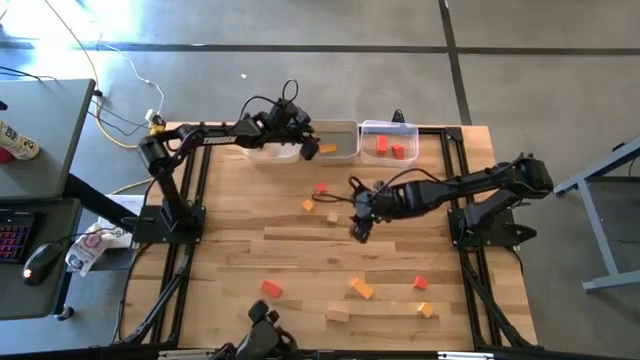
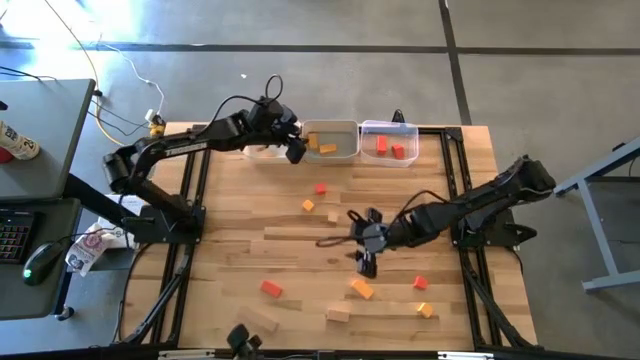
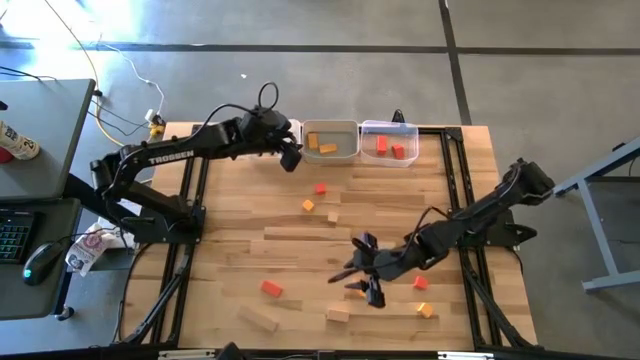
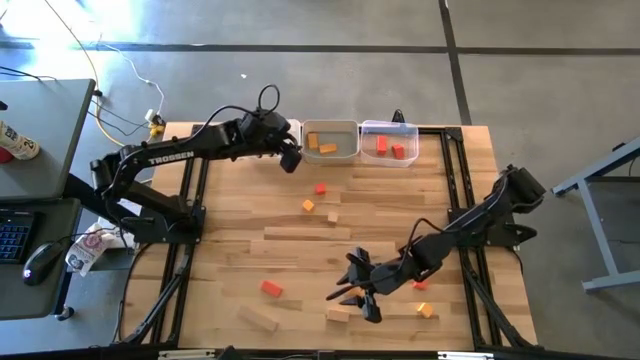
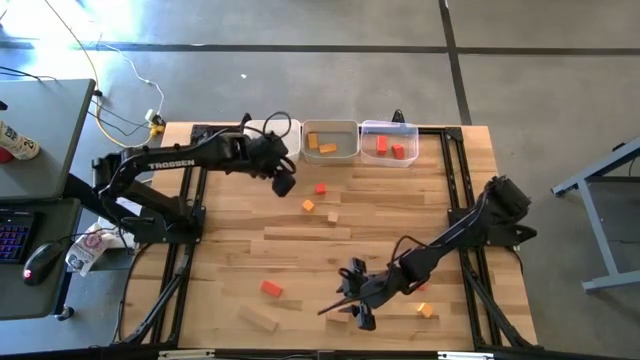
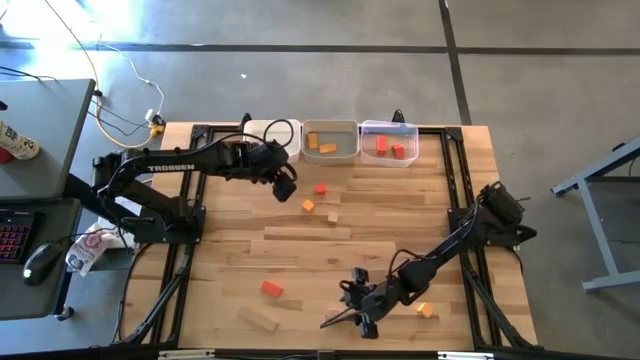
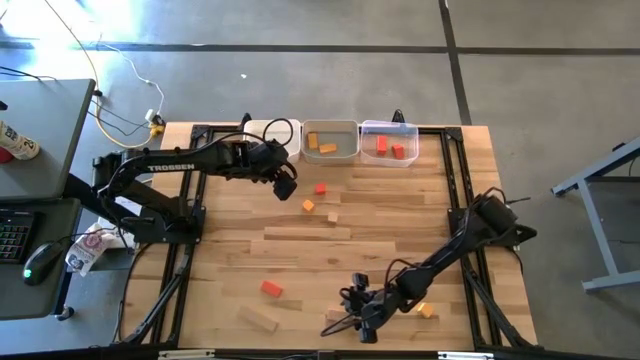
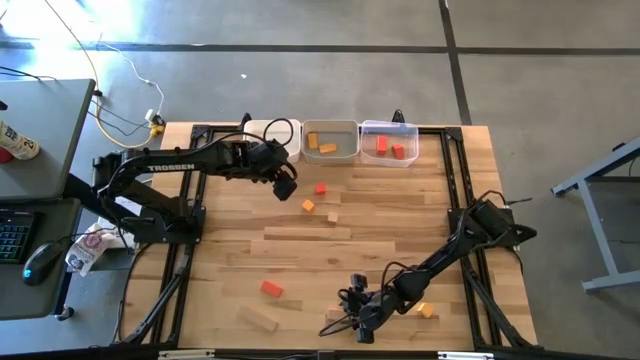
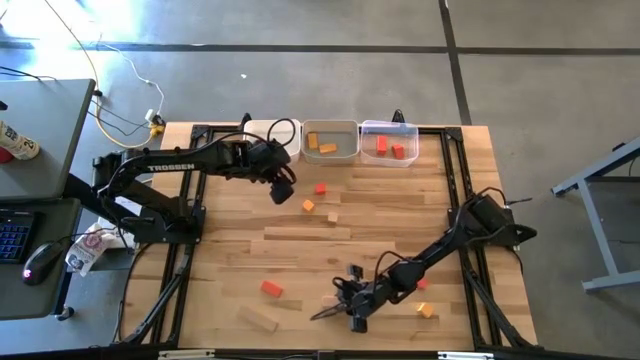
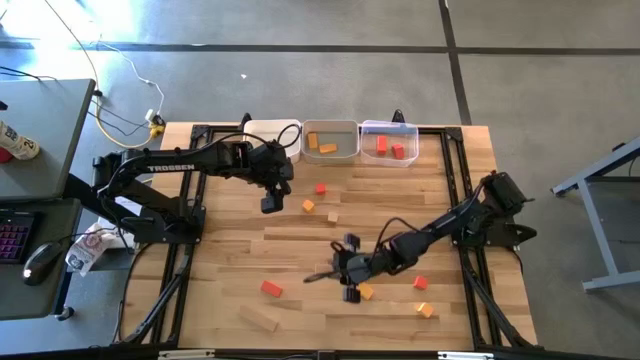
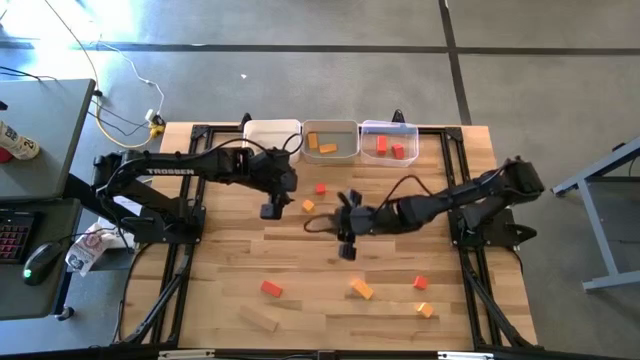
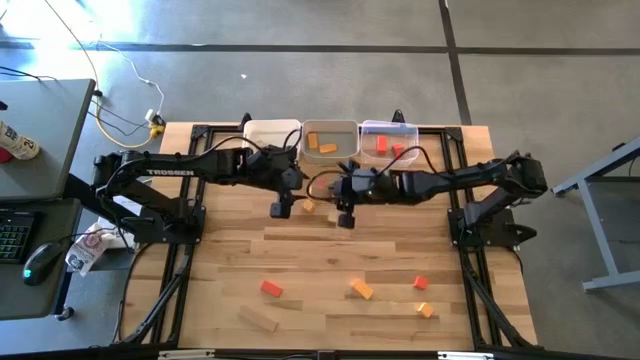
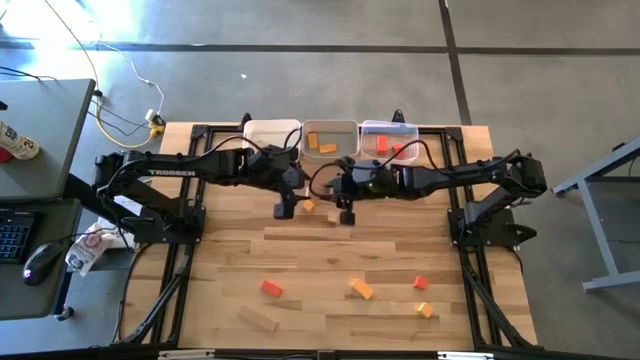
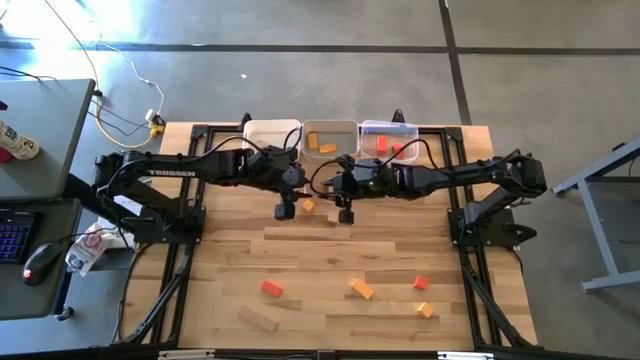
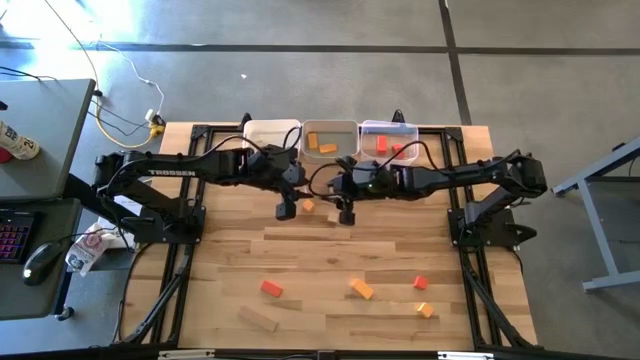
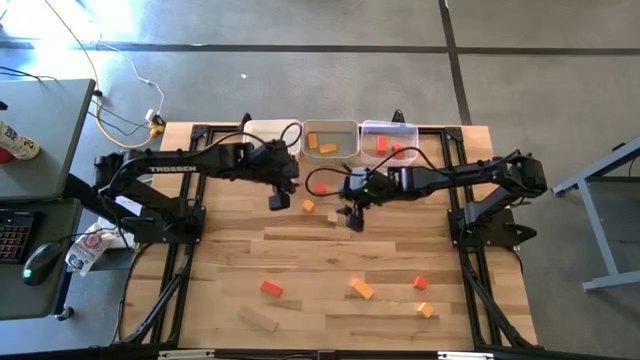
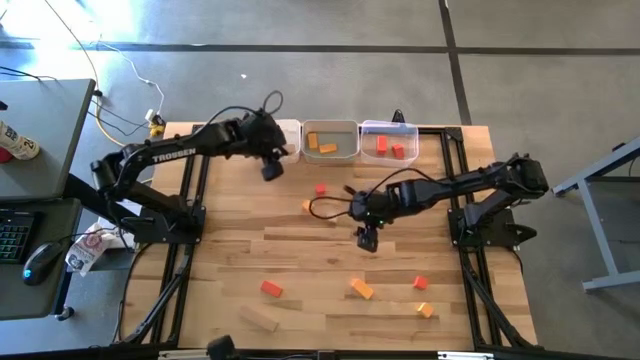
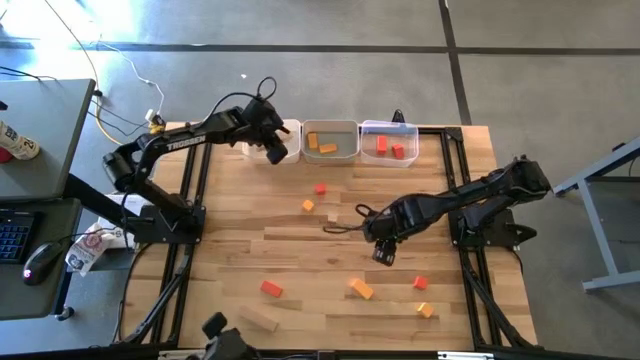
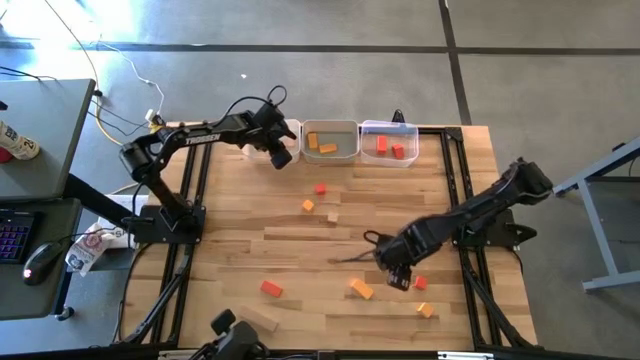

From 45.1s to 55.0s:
Task: Sort & place blocks by color
Put the brown block into the white bin

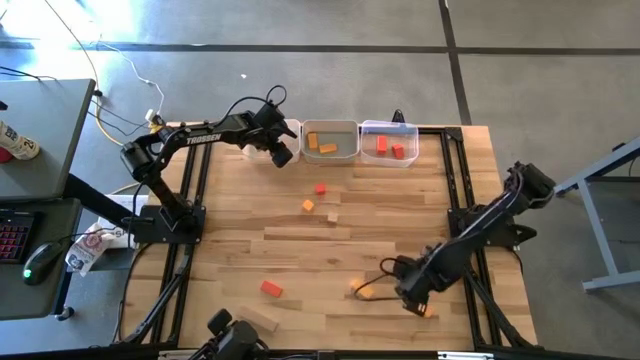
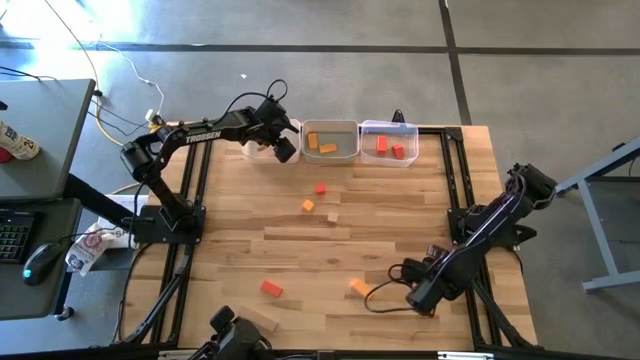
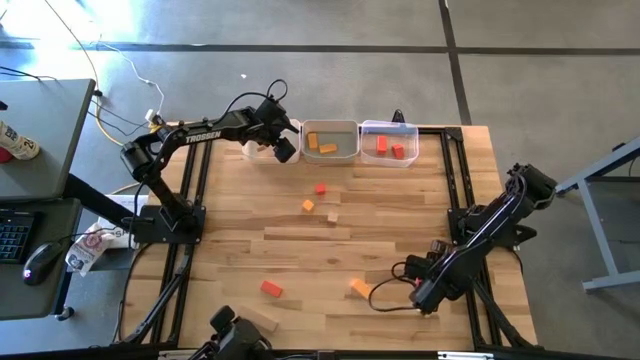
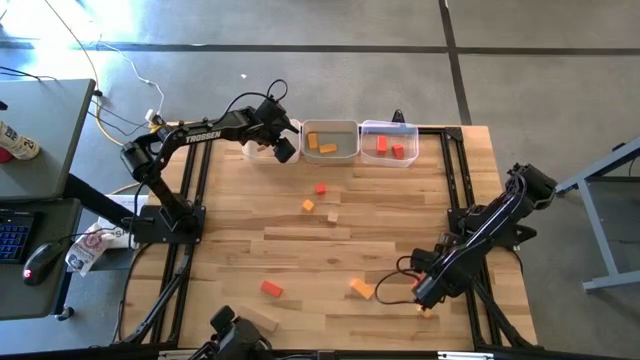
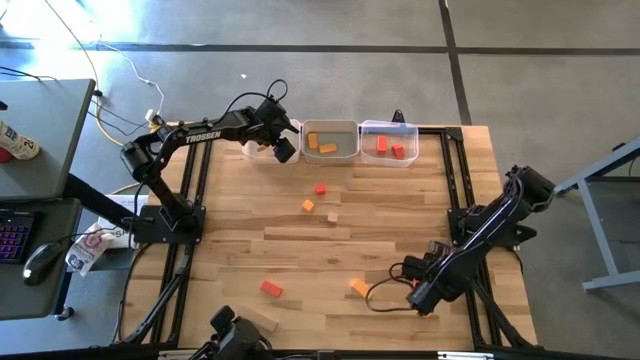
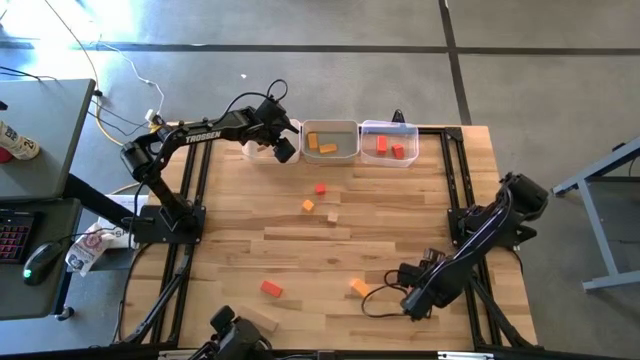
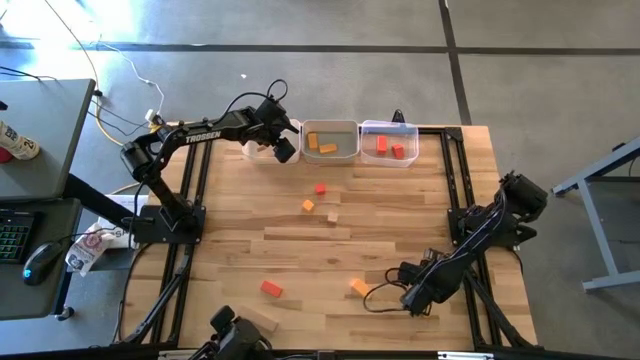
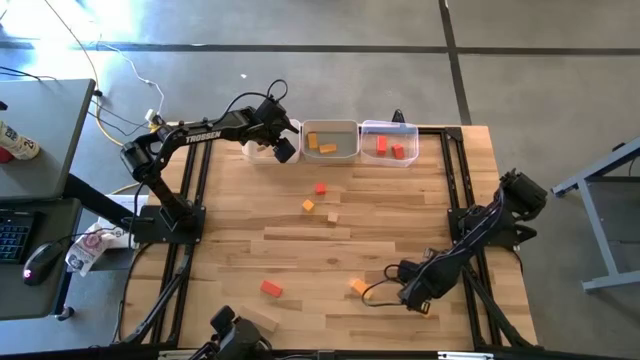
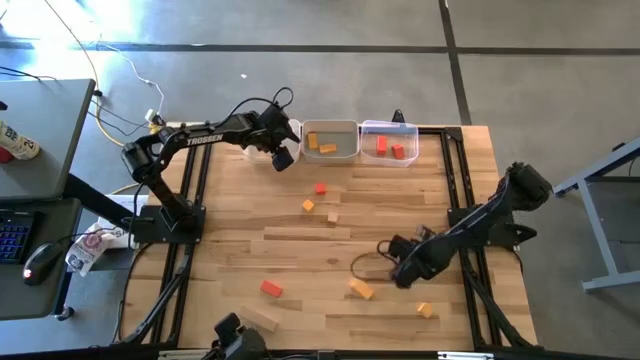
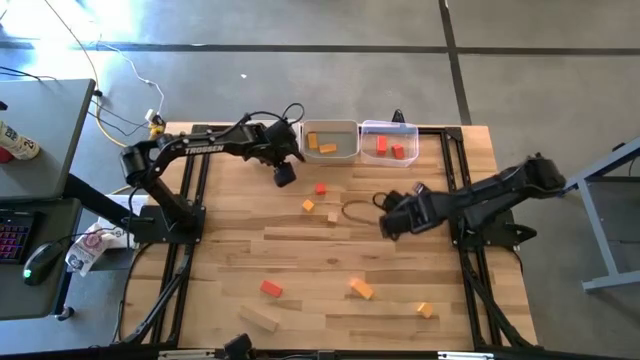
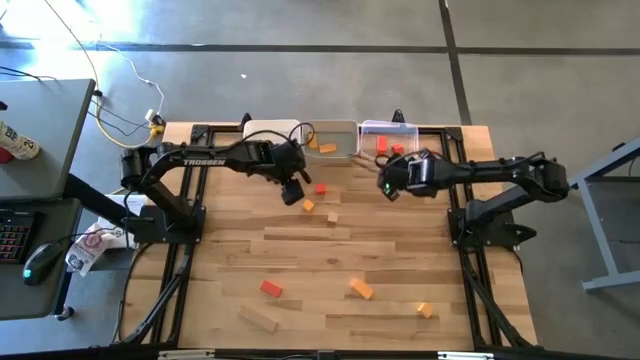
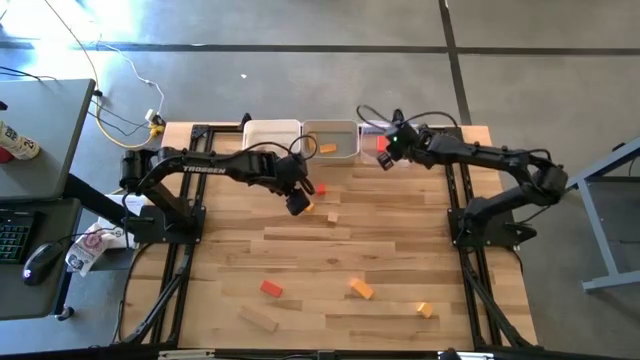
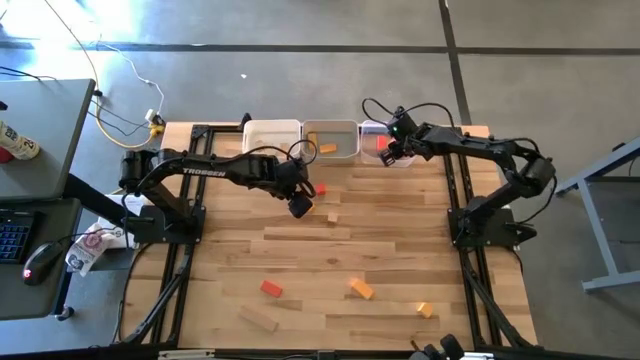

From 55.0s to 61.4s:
Put the orange block into the transparent bin

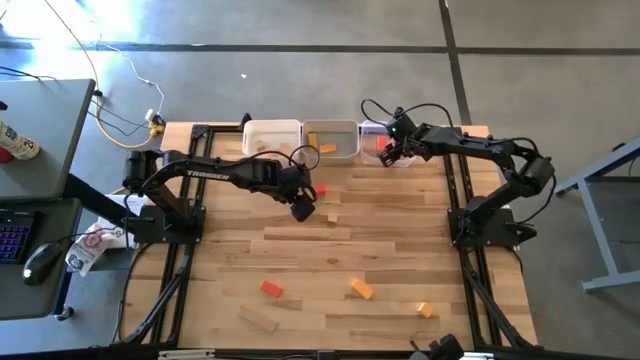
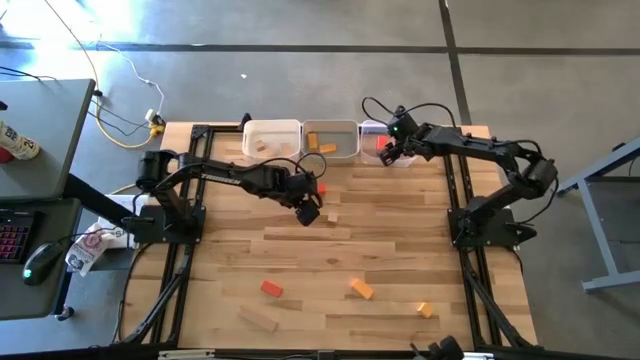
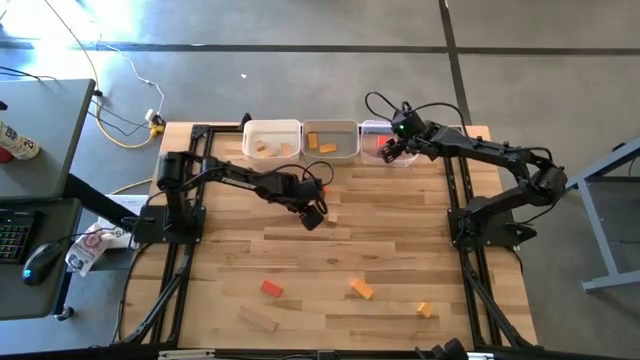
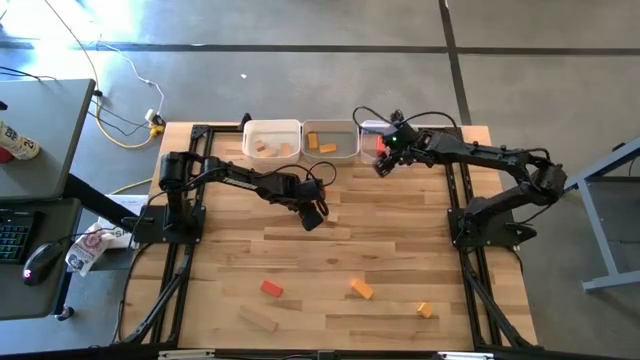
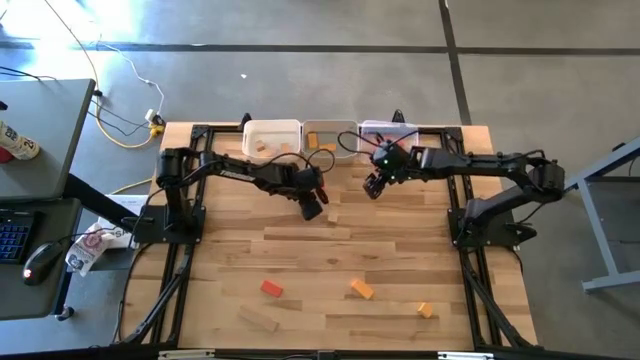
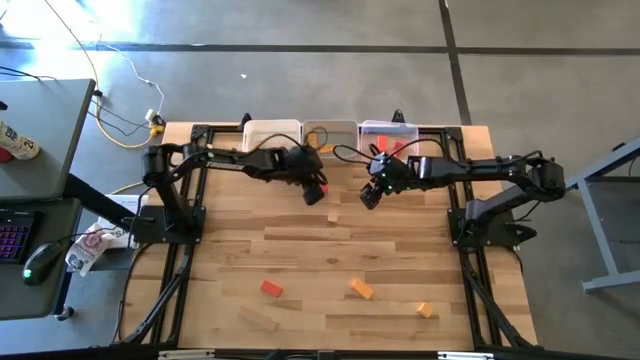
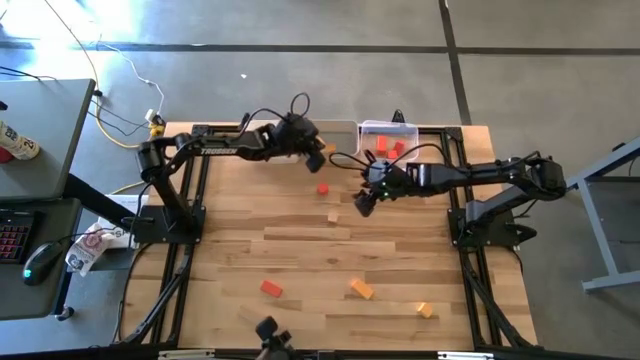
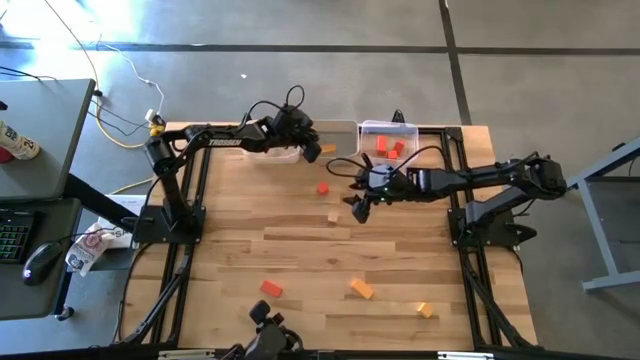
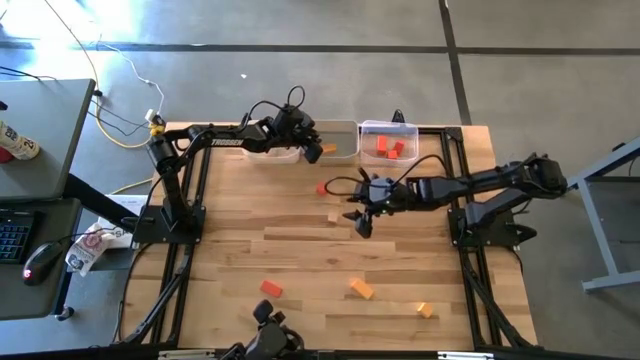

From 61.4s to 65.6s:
Put the yellow block into the gray bin
